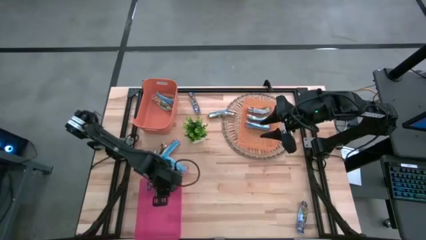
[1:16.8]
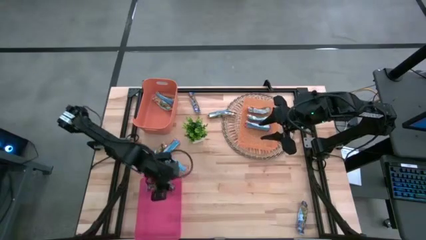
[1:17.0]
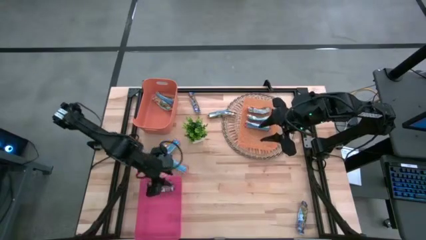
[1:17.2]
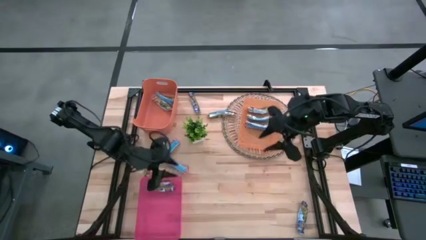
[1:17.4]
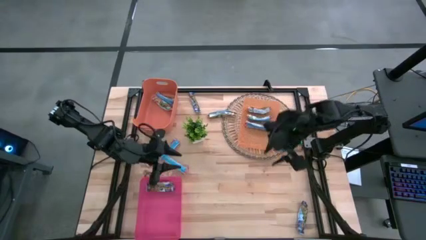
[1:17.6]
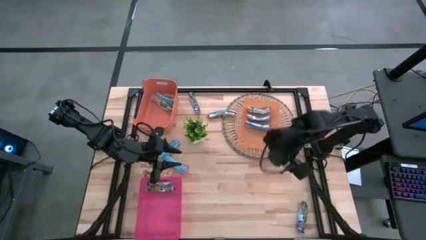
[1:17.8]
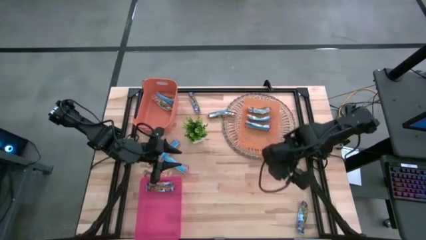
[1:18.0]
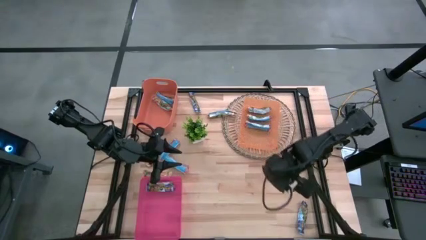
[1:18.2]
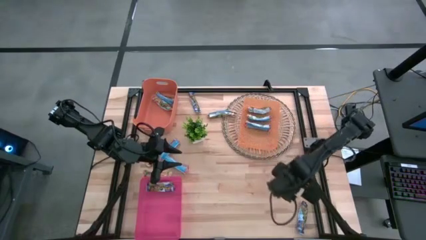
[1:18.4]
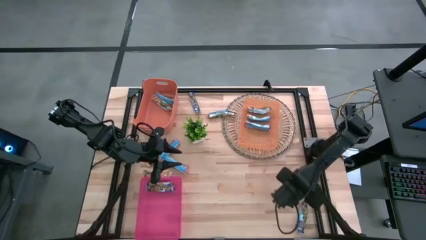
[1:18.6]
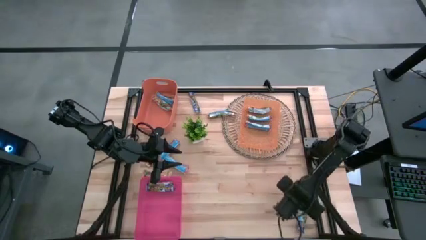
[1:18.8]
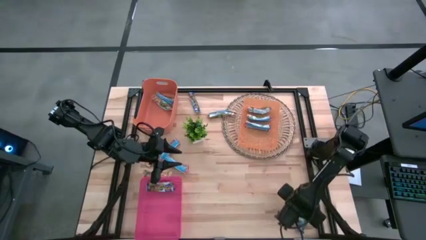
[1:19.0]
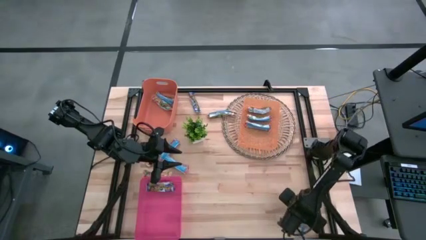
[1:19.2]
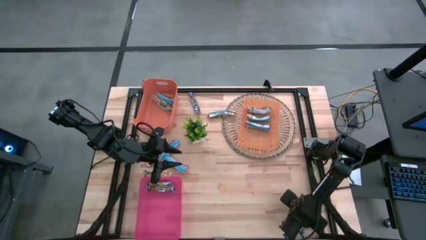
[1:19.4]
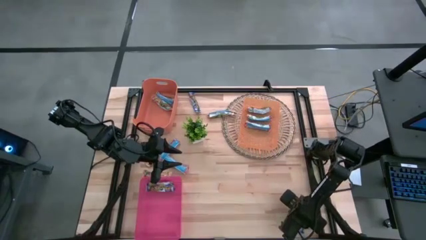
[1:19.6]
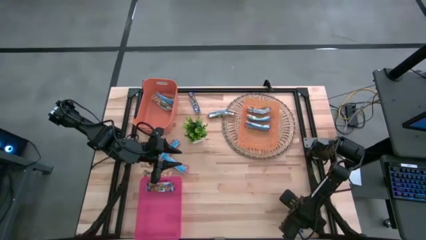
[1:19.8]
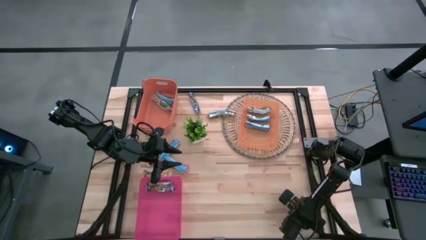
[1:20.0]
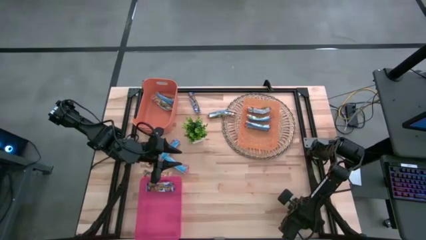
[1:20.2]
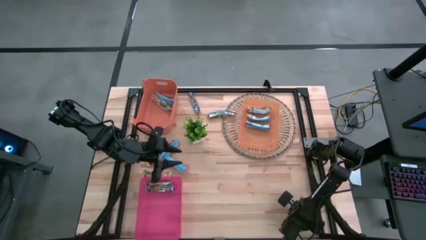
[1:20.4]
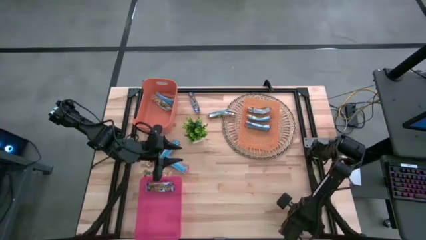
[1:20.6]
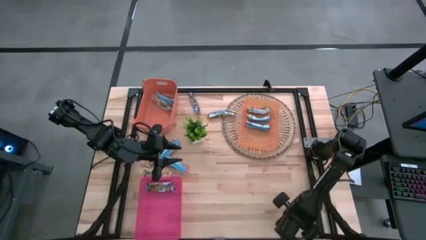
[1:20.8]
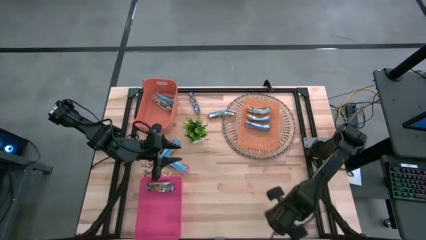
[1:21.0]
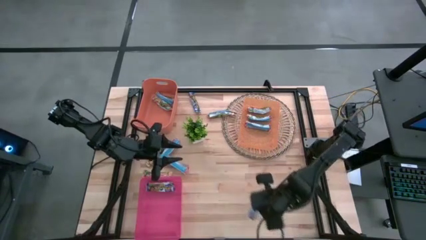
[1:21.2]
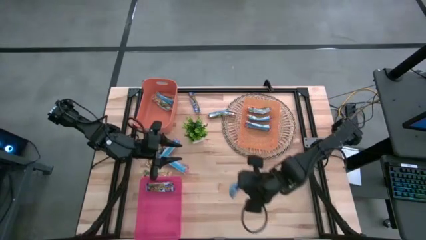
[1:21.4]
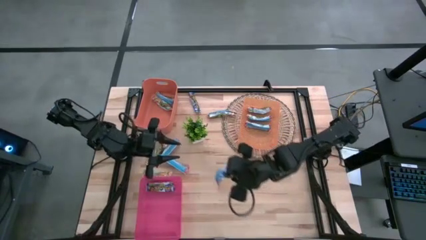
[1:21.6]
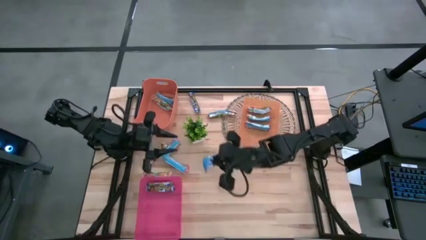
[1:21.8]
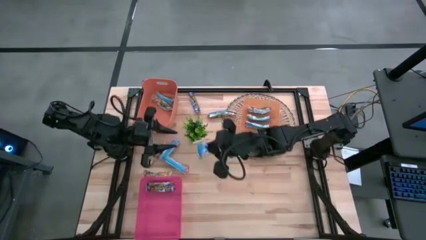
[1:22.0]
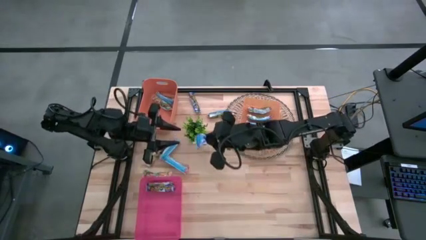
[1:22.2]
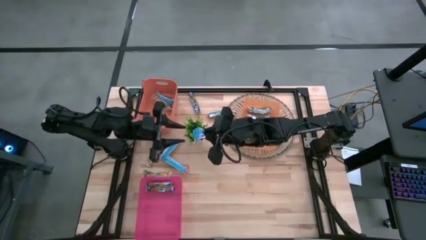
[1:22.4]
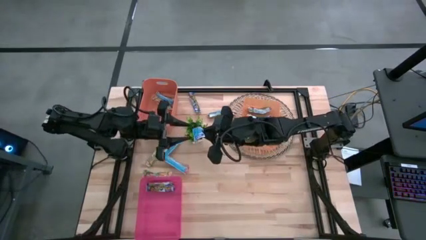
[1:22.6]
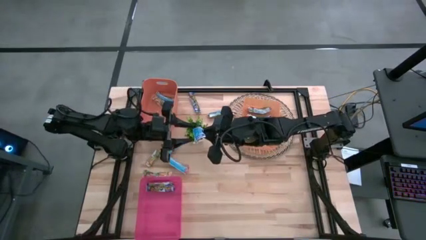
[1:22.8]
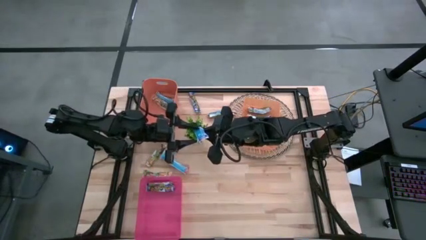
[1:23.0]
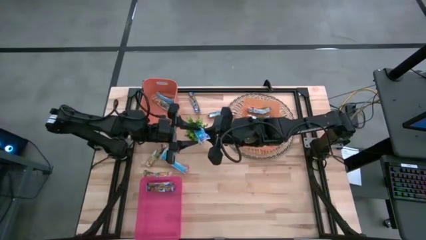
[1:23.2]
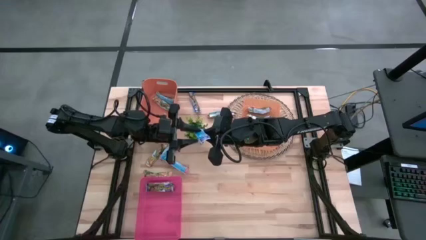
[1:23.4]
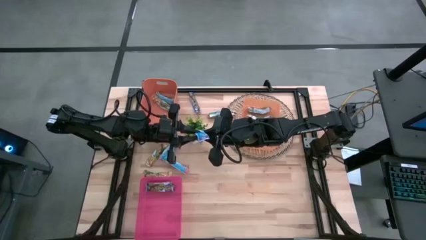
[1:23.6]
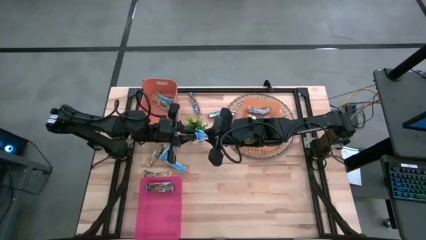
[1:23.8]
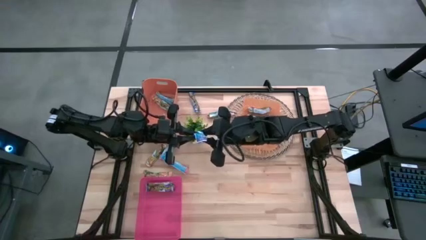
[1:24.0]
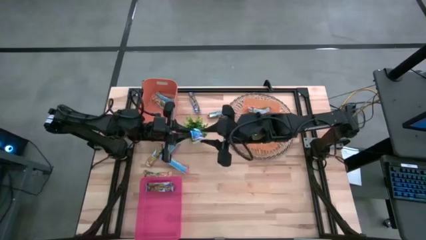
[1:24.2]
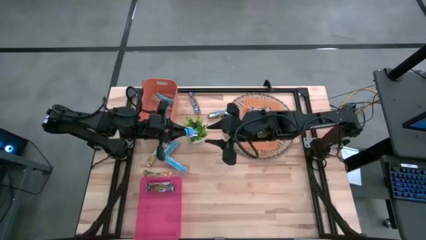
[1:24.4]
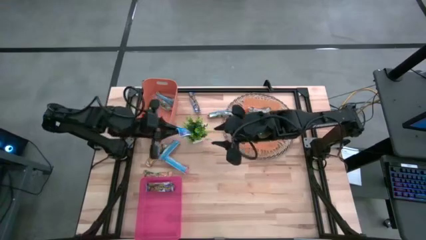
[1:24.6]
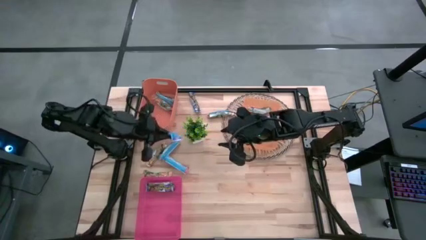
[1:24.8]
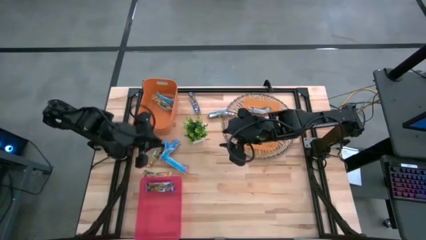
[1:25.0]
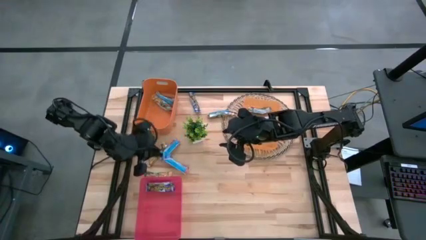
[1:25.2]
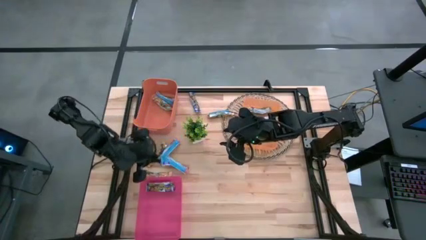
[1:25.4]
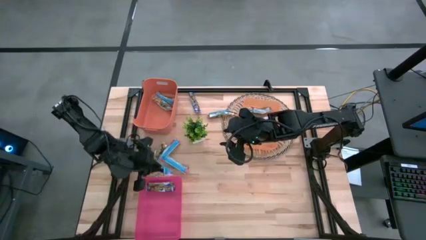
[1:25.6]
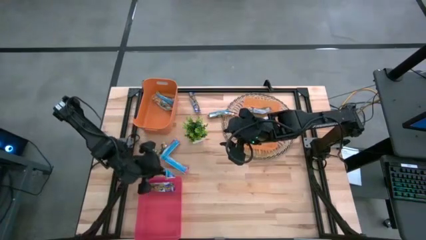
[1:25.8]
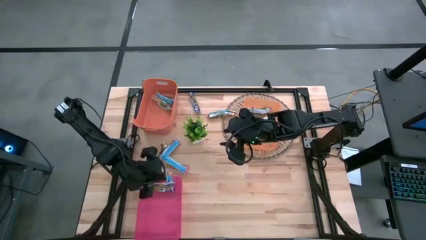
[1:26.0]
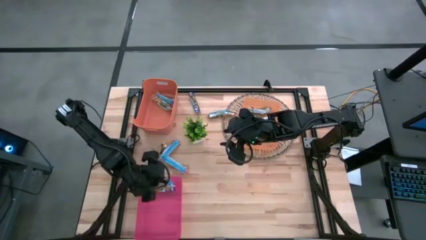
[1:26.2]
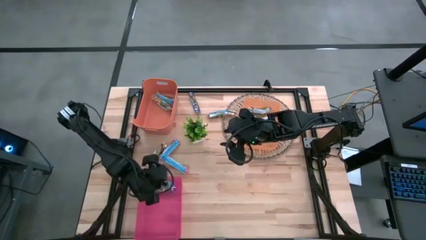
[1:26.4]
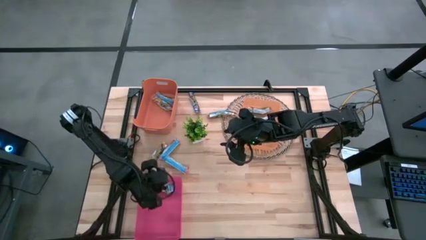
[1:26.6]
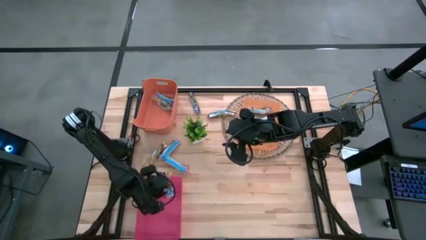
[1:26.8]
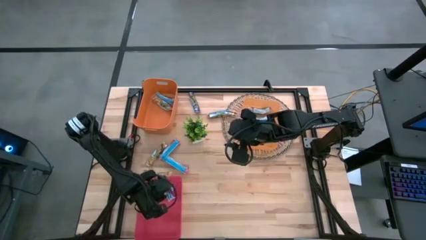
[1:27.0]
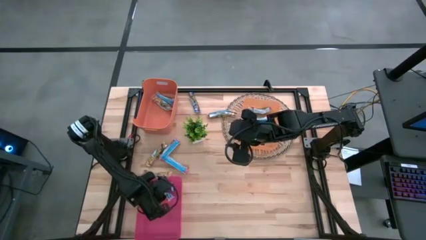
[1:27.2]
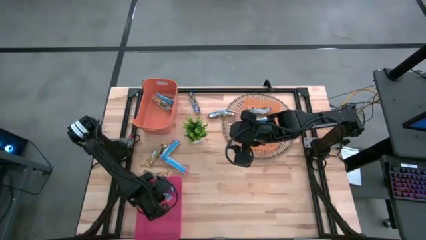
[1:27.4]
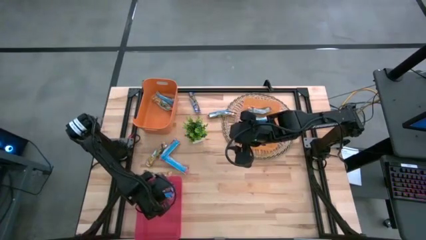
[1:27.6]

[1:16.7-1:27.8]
Task: Pick and place Granola Bars by type
Put the bottom blue granola bar into the pink bin
